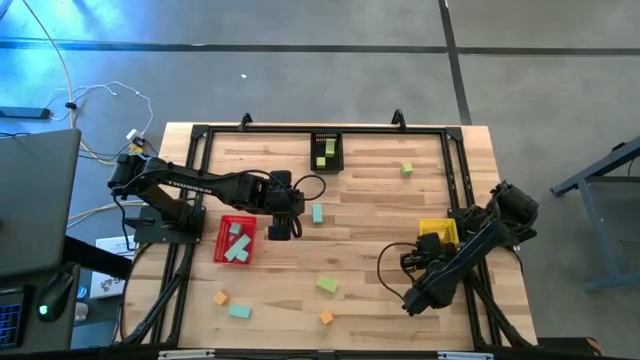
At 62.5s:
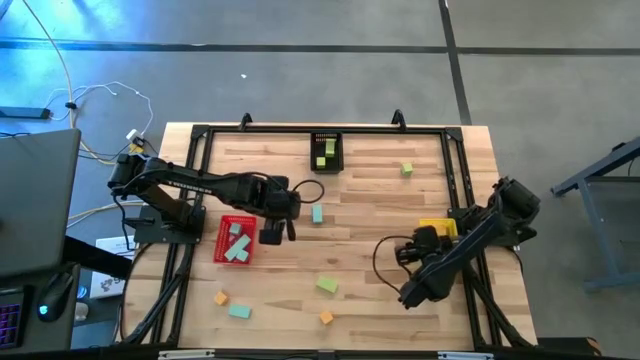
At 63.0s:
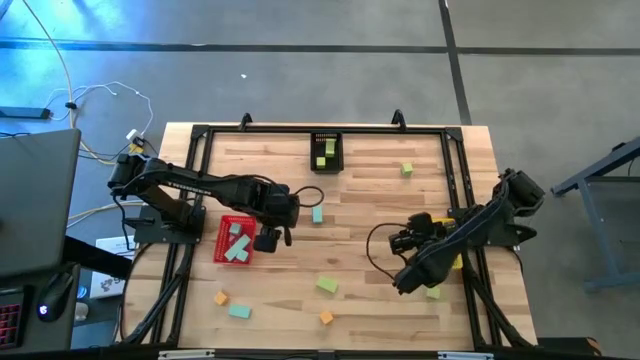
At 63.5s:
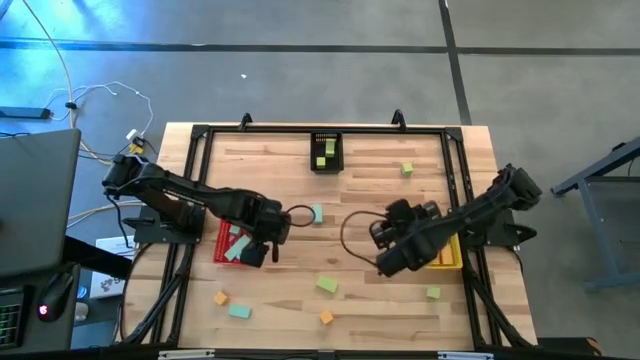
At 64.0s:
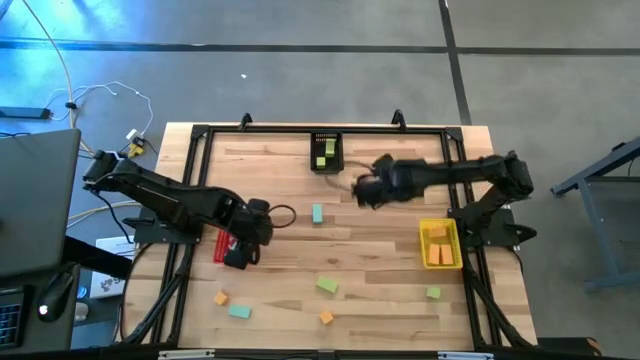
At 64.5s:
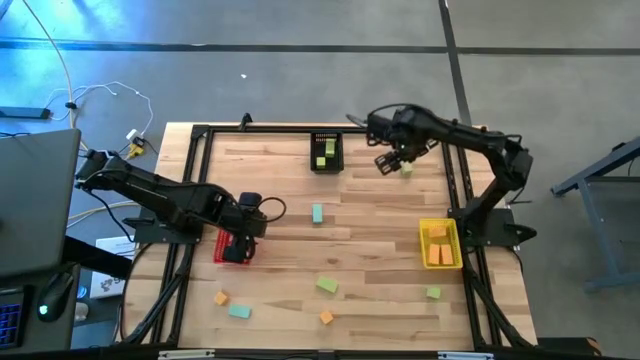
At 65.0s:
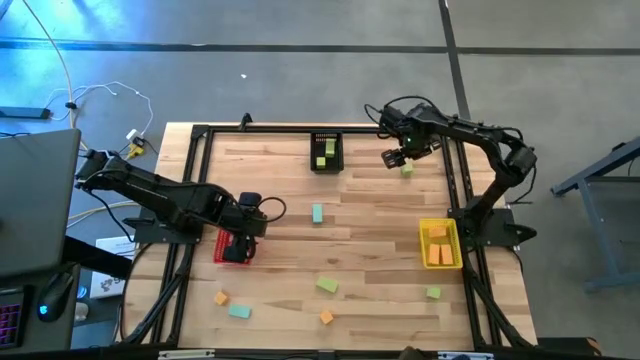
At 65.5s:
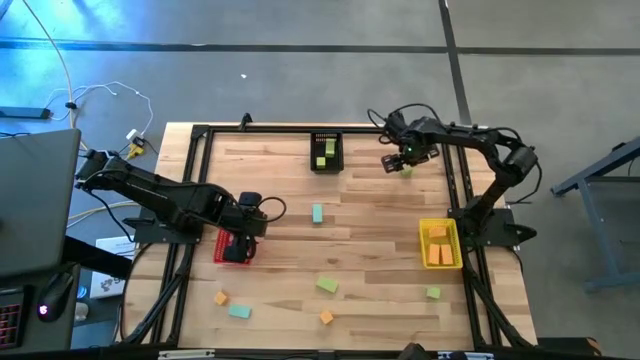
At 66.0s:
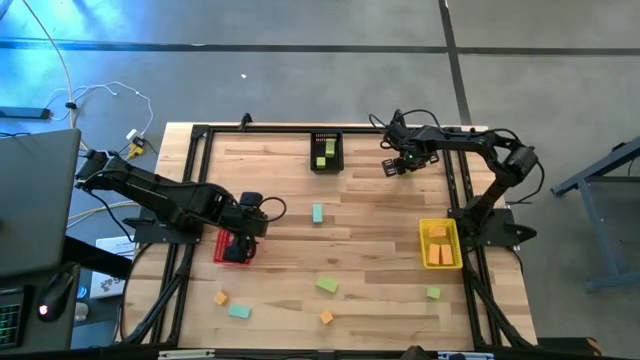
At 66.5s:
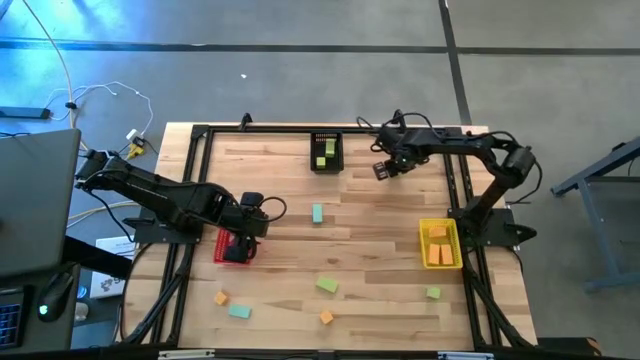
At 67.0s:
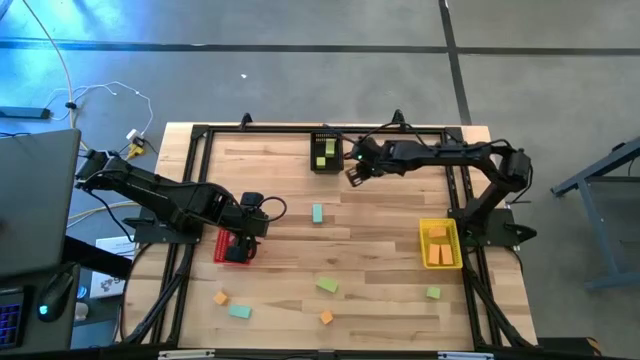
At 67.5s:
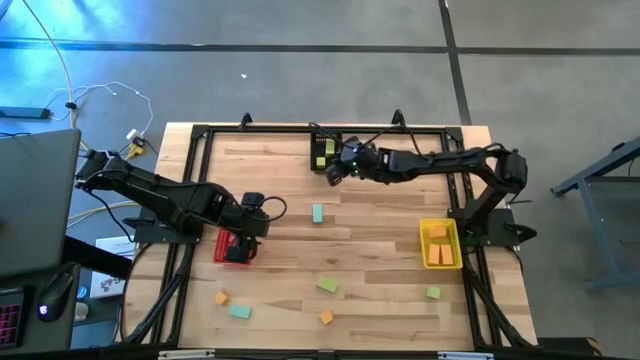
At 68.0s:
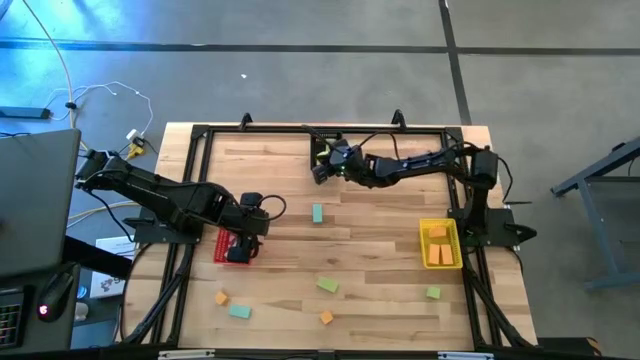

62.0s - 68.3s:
Task: Sort & place blocks by color
Put the green block into the black bin

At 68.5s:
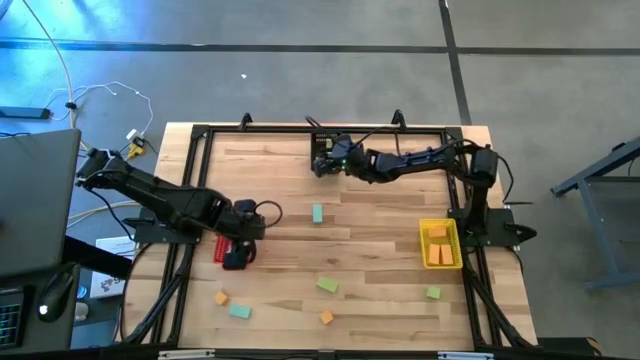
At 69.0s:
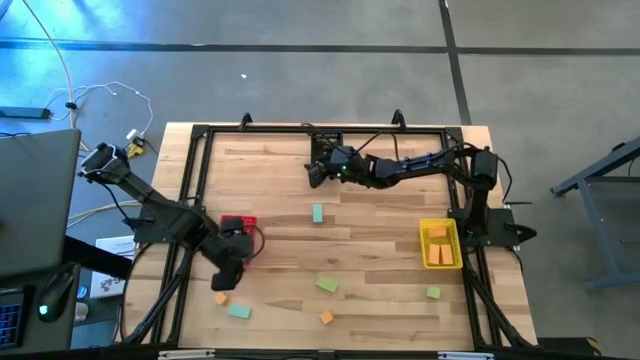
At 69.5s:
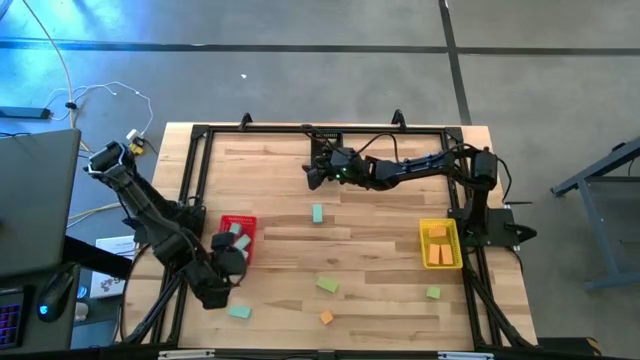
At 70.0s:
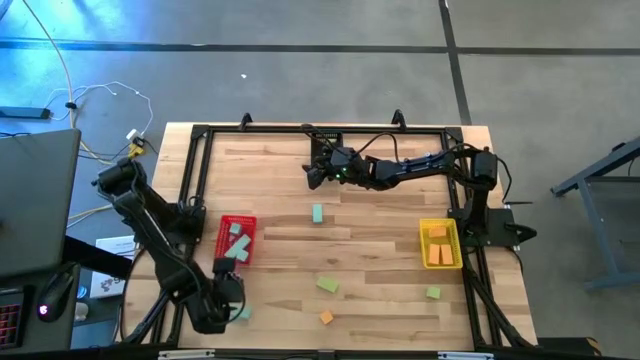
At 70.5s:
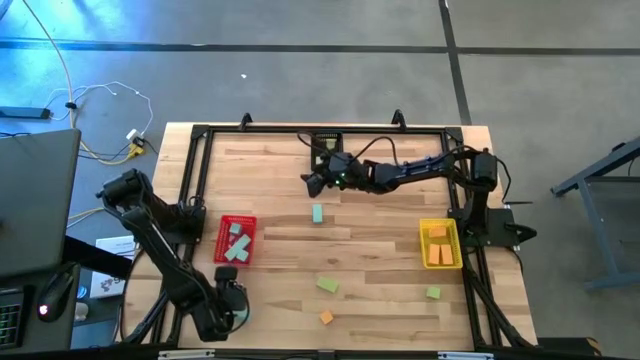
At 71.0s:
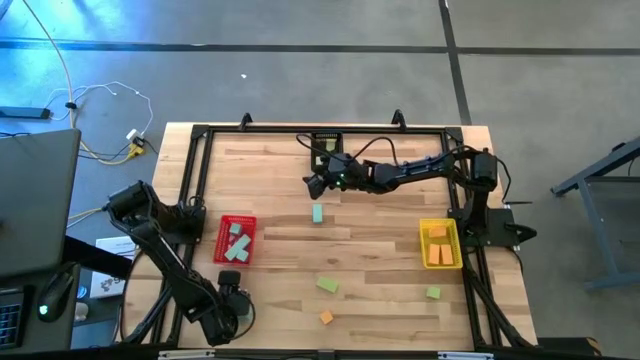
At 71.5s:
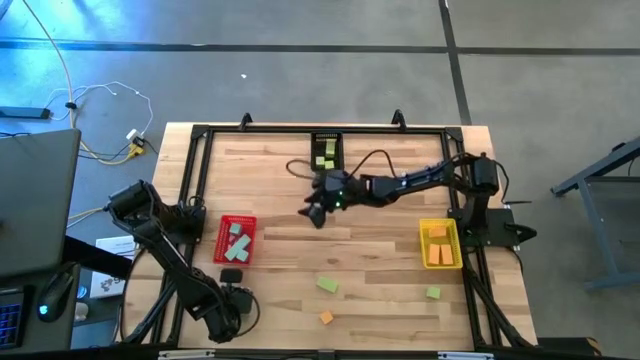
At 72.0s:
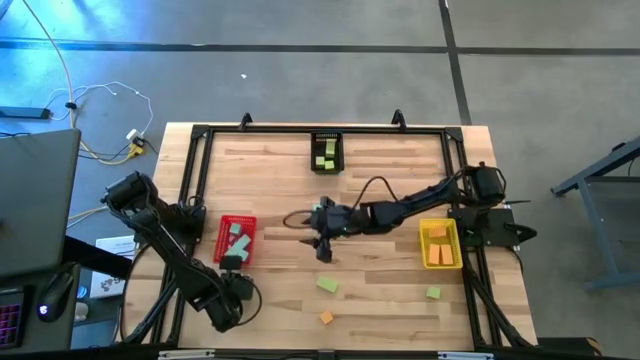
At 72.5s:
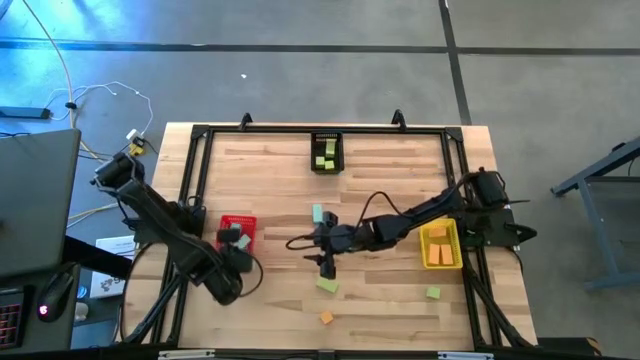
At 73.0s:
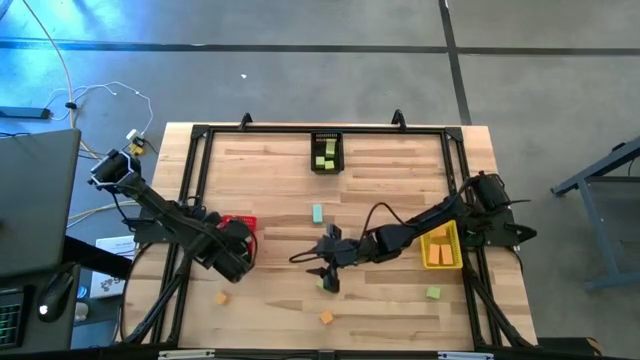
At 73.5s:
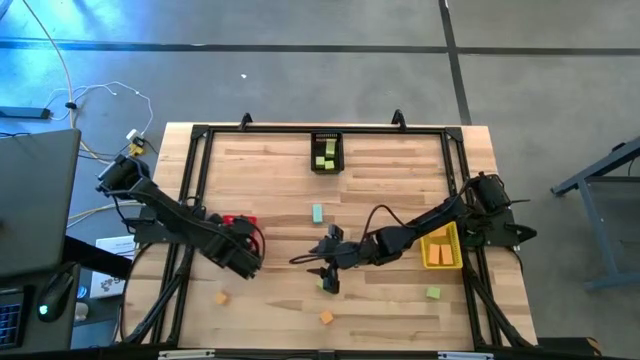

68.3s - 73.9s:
Put the blue block into the red bin

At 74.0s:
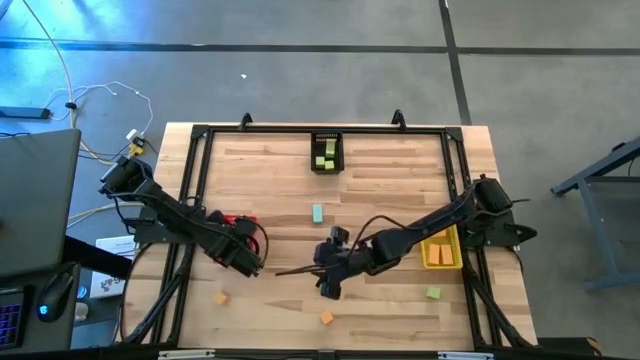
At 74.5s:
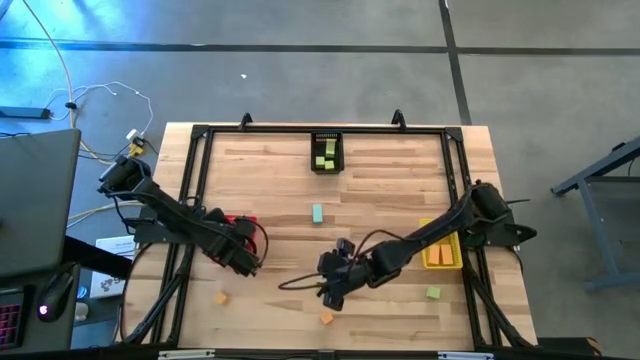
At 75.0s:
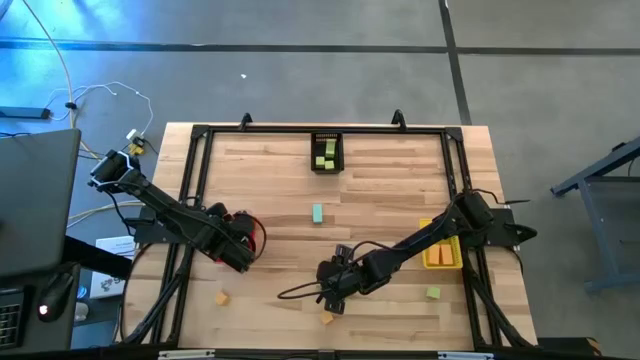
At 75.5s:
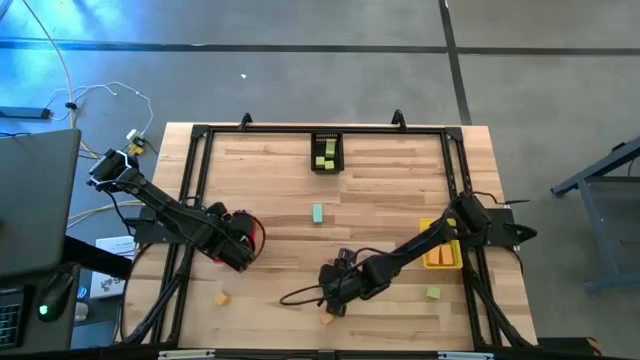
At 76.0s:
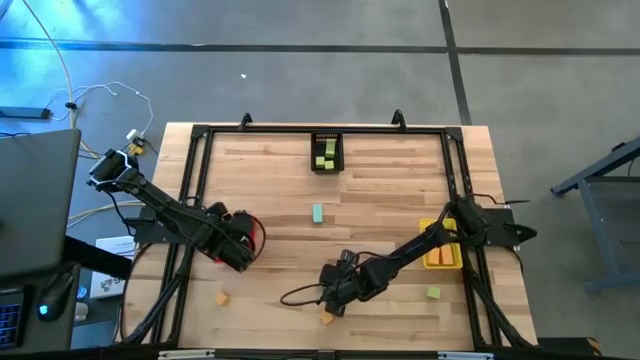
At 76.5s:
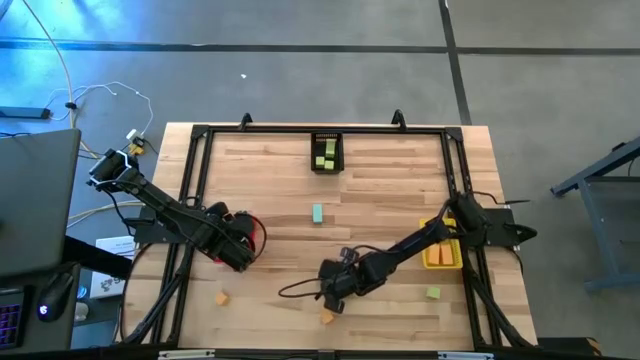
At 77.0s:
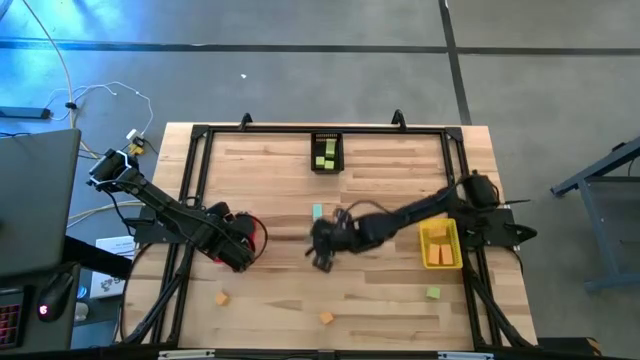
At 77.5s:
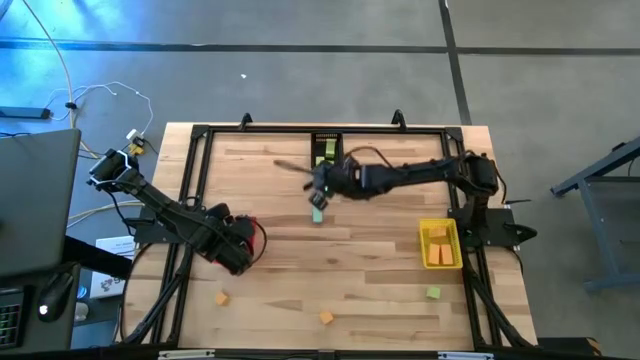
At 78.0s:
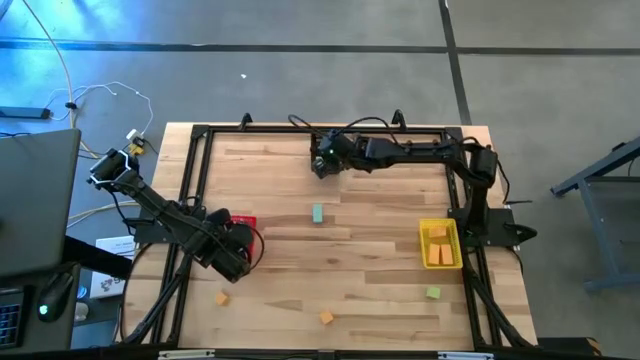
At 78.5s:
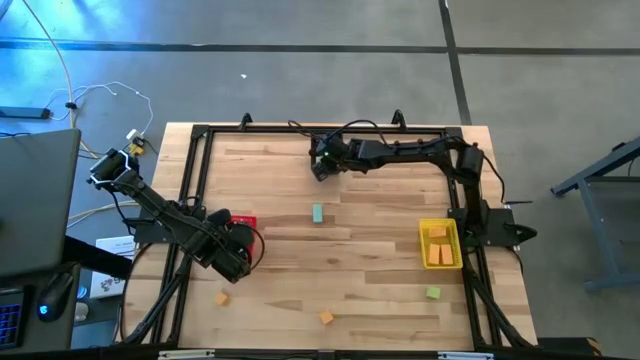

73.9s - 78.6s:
Put the green block into the black bin

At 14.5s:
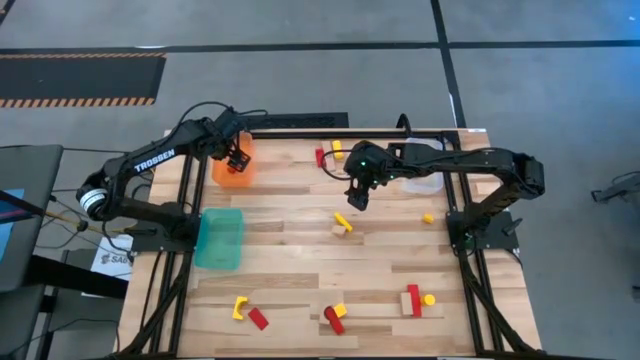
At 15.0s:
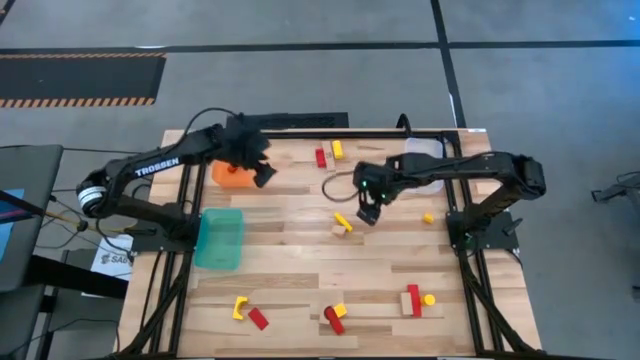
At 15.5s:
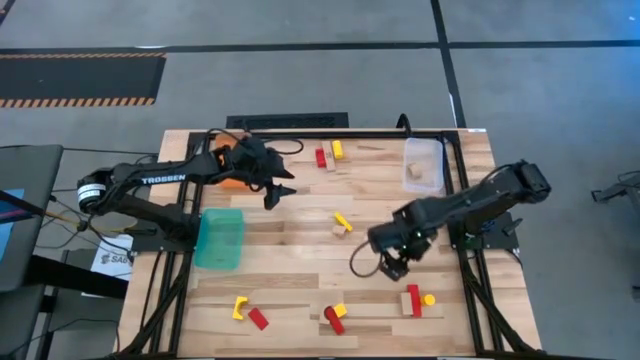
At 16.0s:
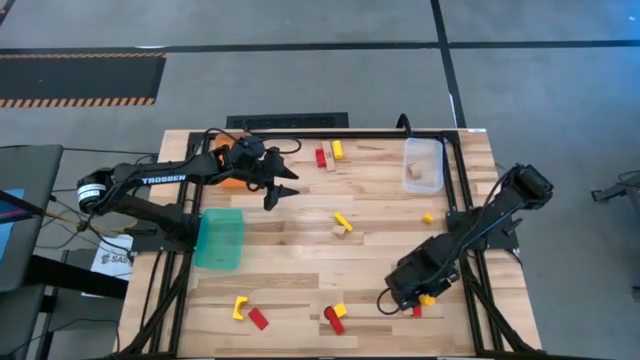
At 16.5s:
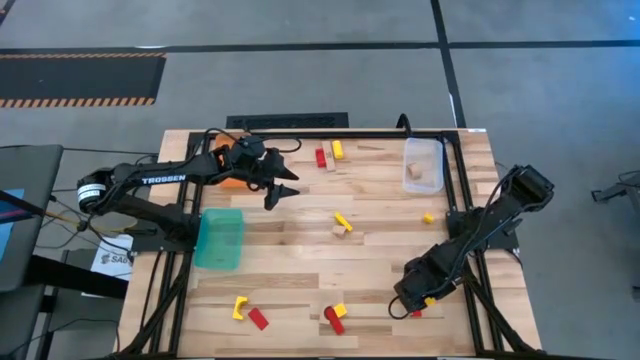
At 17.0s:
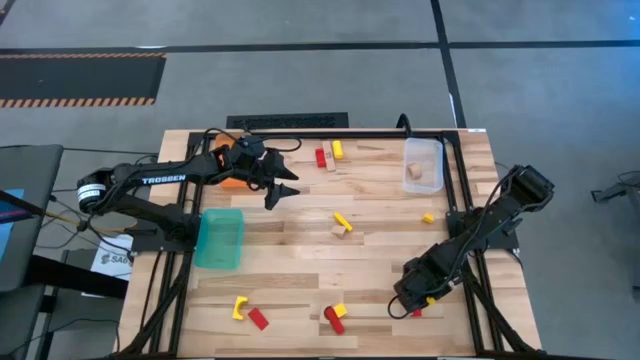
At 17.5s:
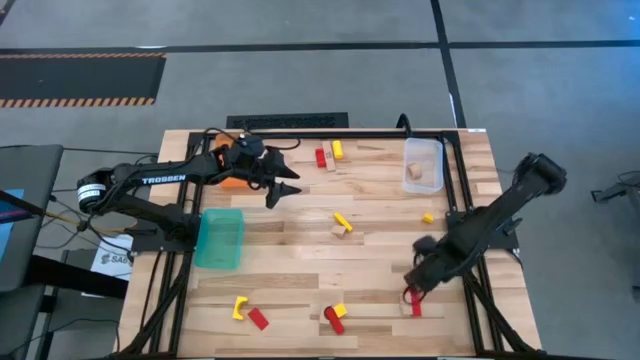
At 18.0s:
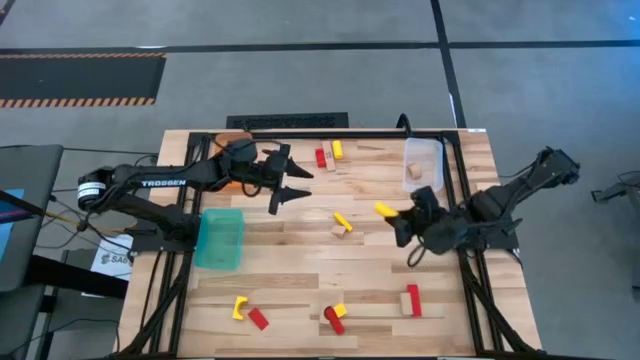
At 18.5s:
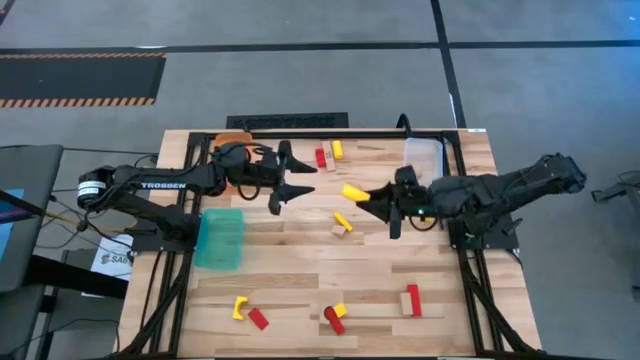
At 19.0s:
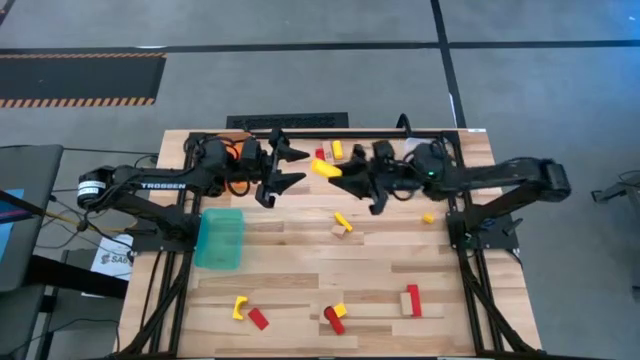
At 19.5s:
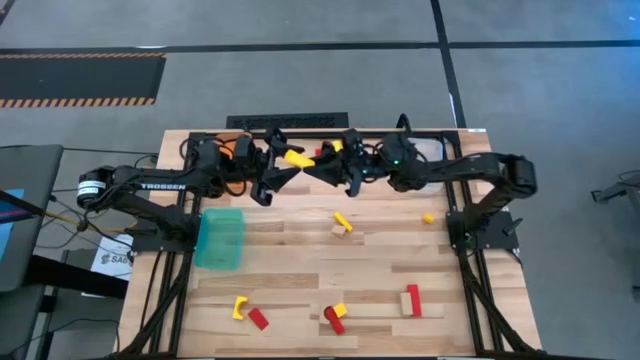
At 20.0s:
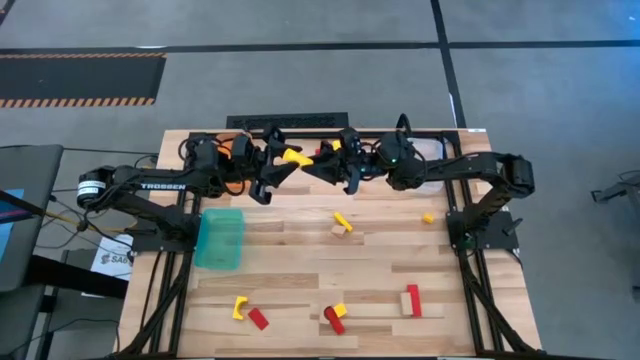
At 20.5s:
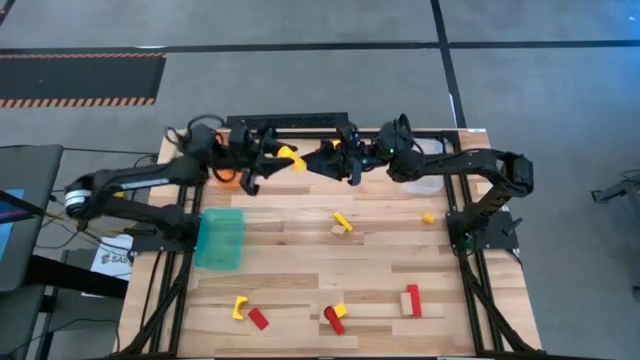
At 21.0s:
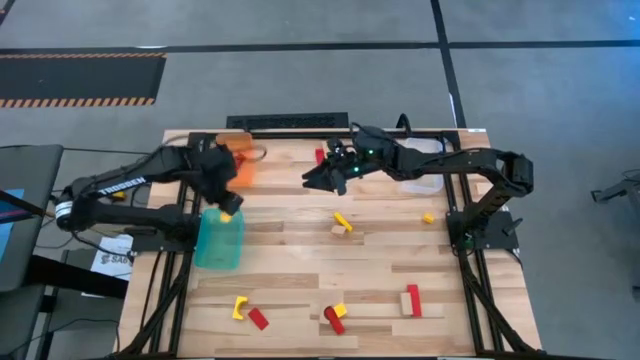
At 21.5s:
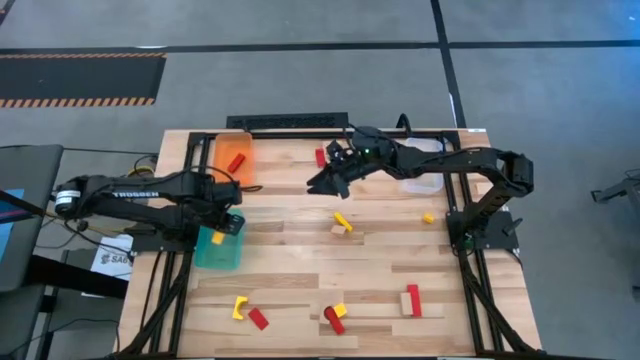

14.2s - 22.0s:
Task: Sort & place blocks by color
Put the yellow wooden block into the green bin
